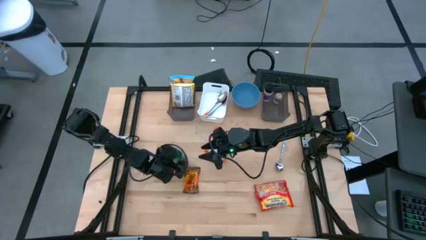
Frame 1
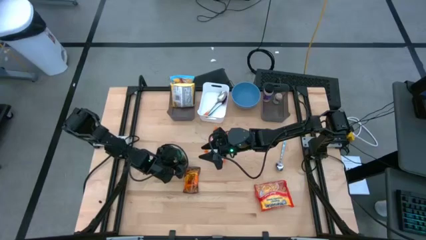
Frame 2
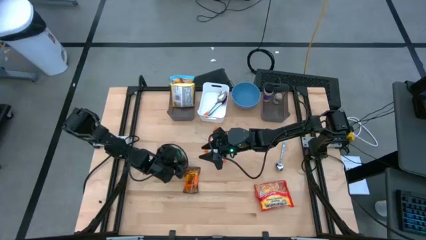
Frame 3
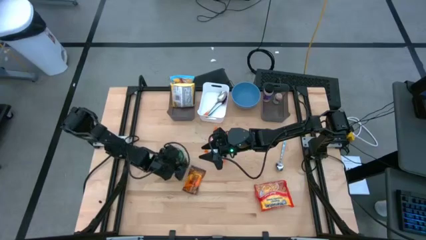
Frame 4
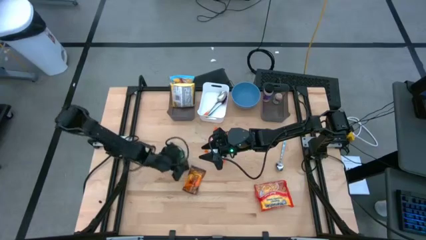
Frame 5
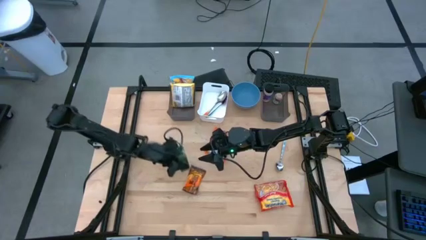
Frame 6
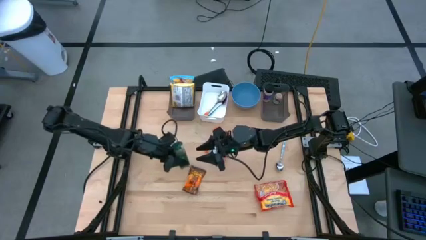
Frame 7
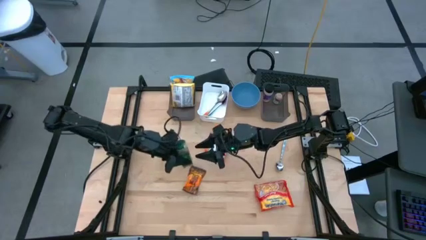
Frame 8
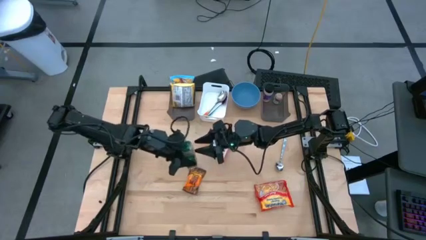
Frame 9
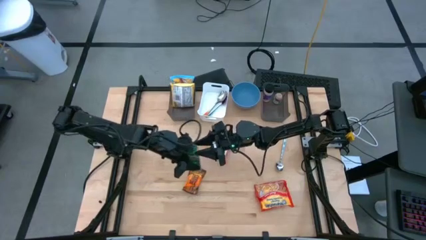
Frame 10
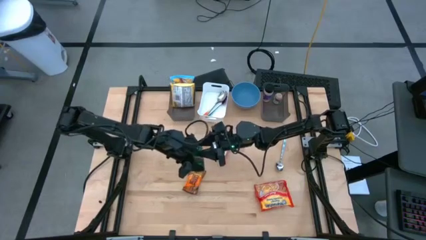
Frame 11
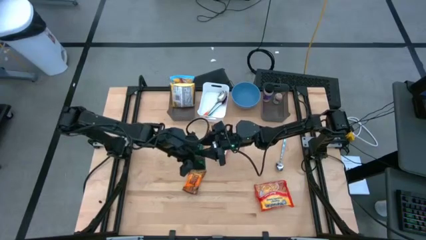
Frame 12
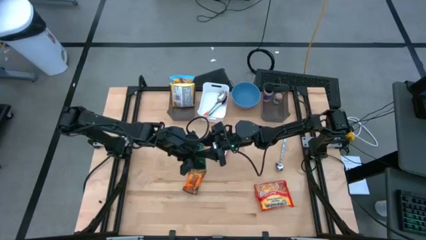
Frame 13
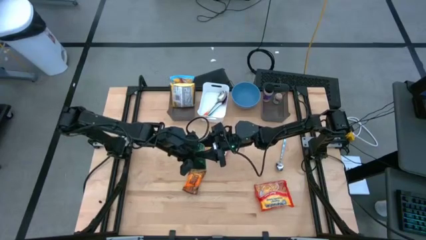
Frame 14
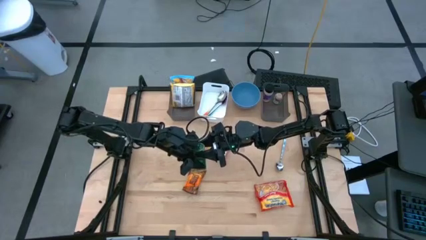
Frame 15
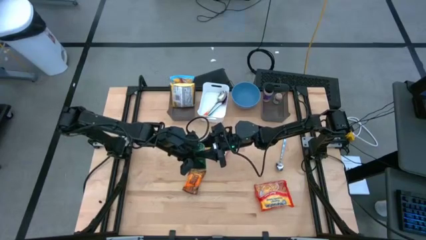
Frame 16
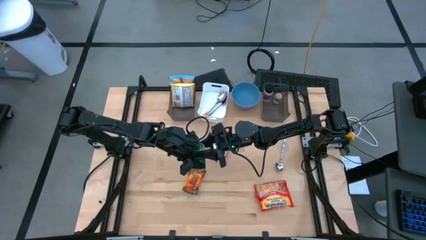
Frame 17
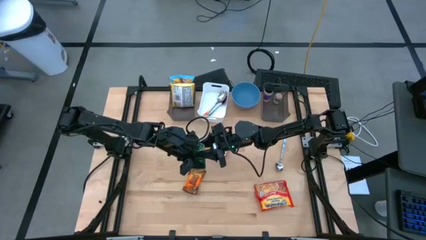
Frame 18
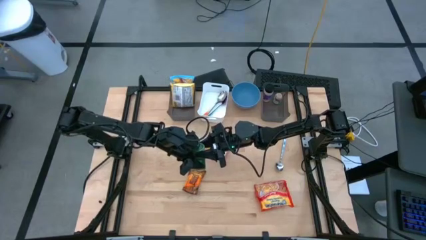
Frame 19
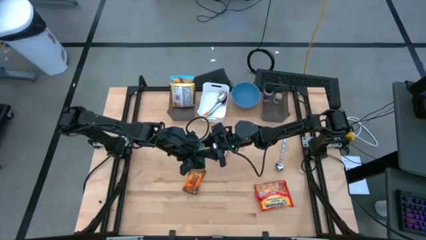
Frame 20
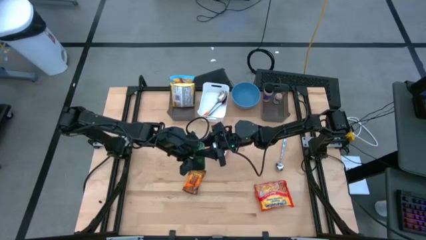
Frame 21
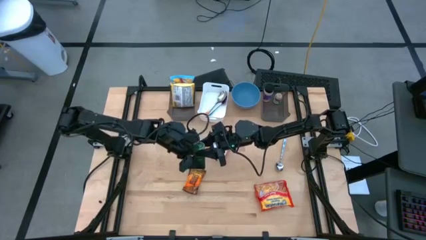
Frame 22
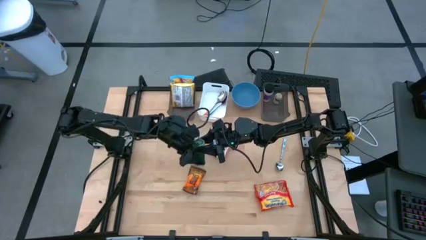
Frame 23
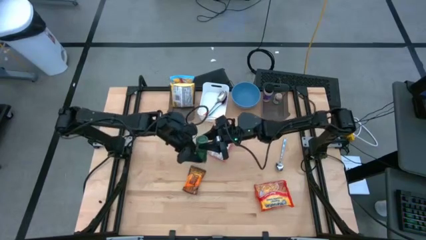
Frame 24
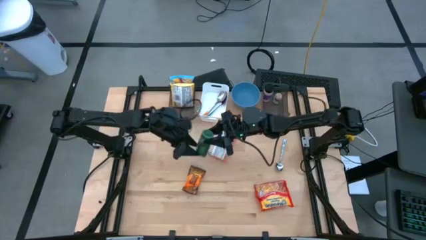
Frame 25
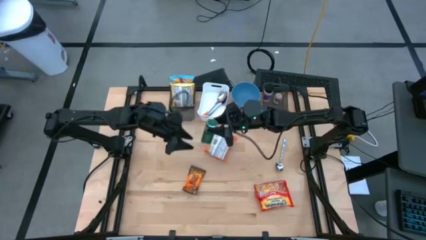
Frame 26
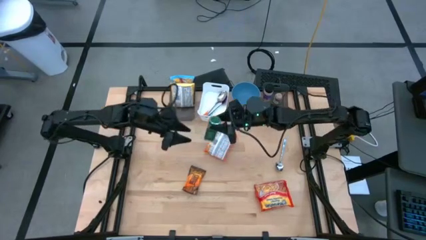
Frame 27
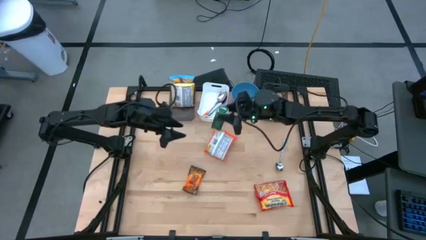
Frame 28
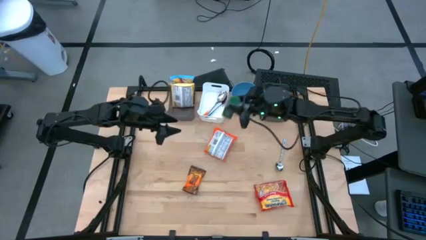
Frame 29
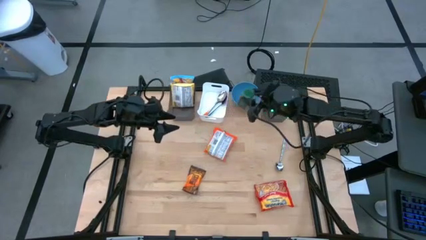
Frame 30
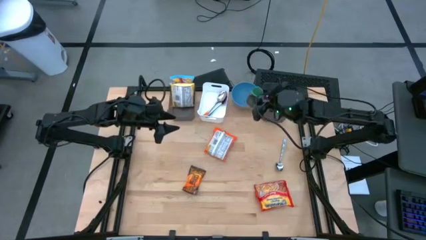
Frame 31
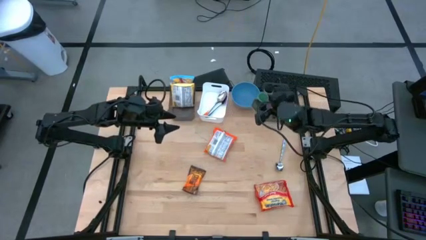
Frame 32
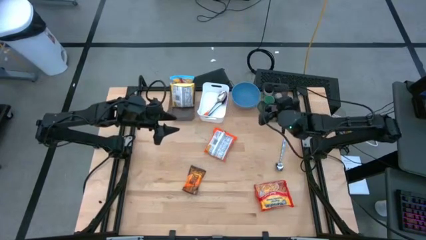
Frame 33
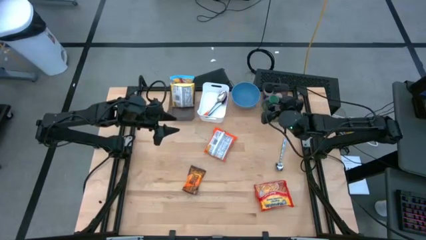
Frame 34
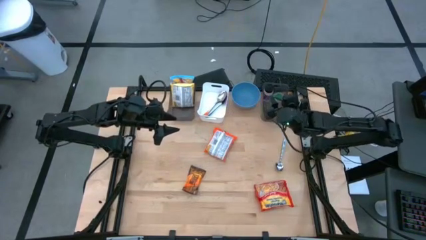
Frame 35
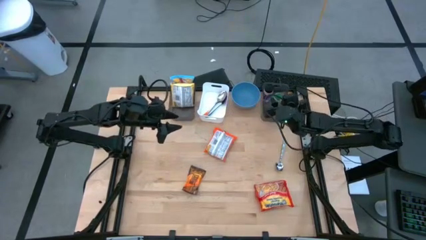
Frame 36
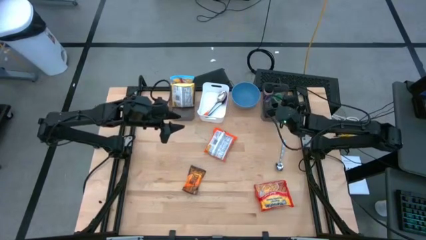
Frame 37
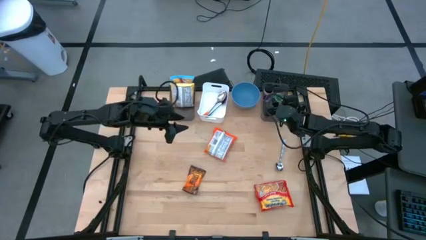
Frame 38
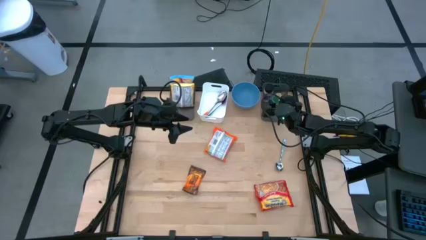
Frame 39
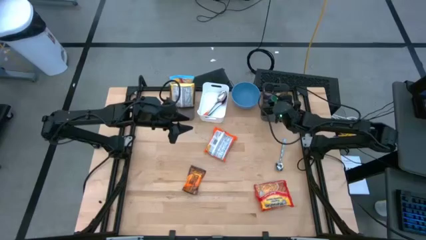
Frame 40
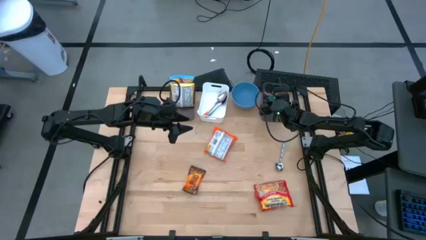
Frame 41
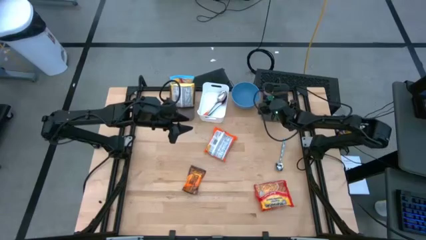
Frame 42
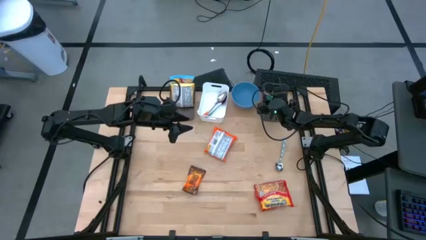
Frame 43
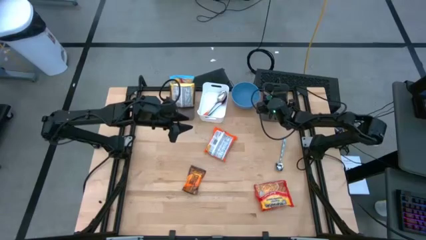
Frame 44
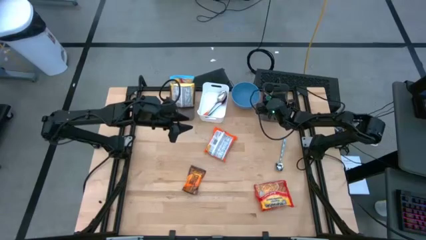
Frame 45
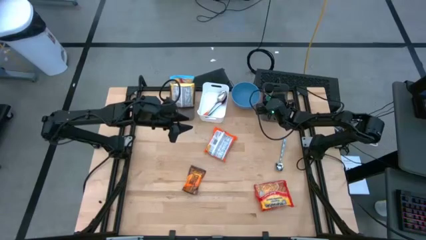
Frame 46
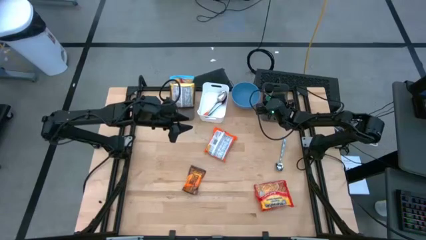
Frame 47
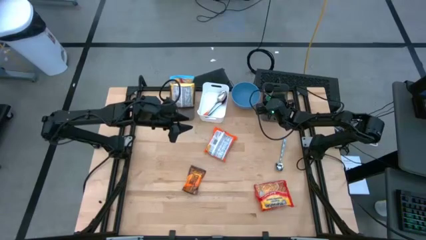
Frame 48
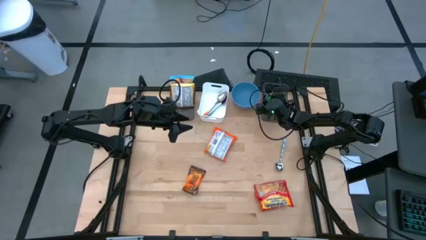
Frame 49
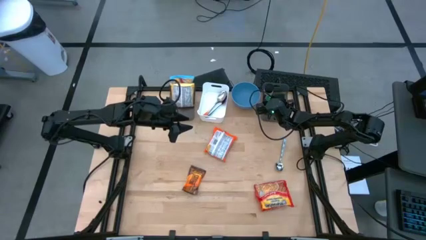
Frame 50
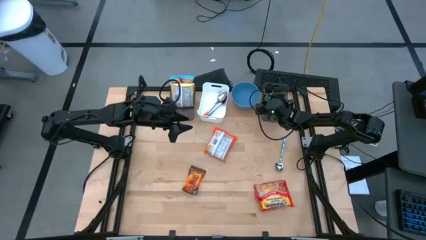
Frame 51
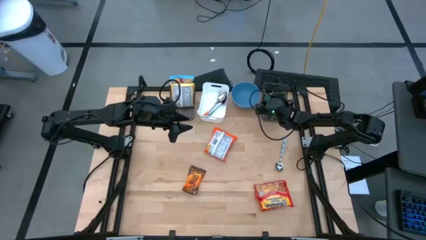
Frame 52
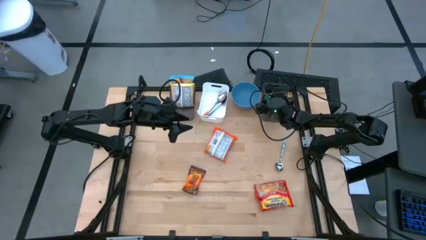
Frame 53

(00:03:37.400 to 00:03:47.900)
Task: Pick & Place Food Item
Put the green spice bottle into the right black bin

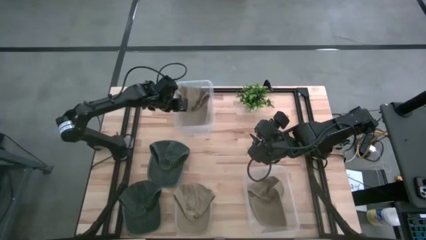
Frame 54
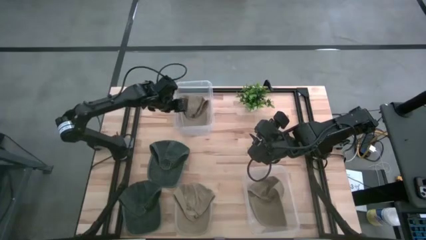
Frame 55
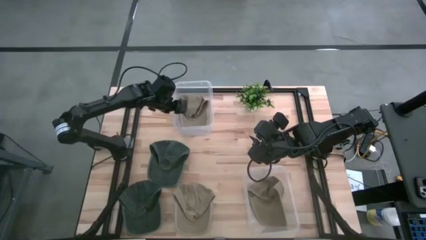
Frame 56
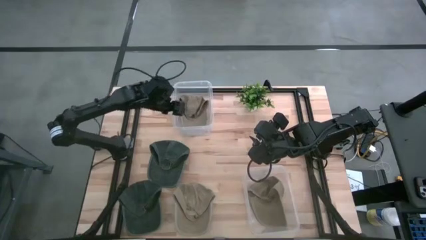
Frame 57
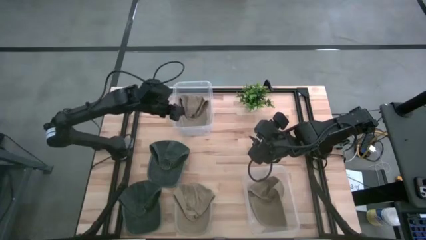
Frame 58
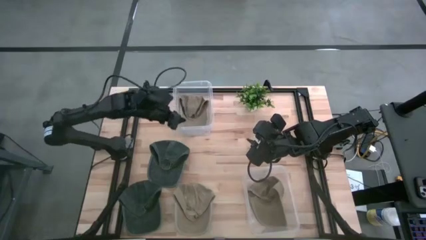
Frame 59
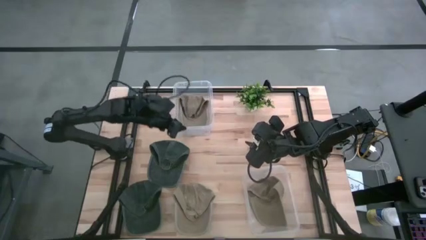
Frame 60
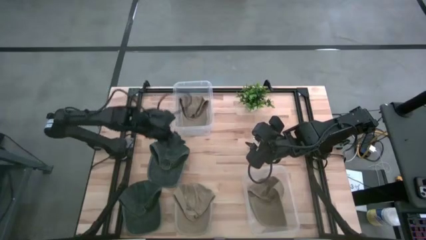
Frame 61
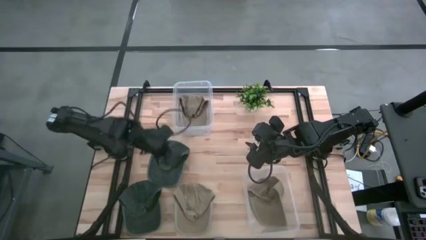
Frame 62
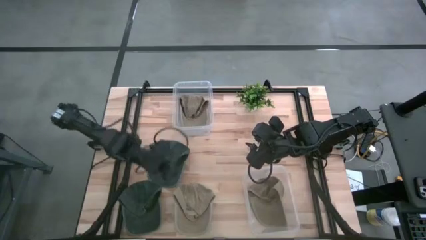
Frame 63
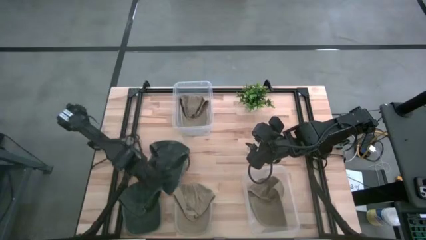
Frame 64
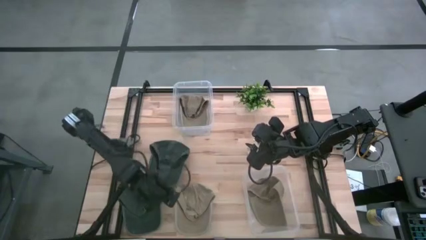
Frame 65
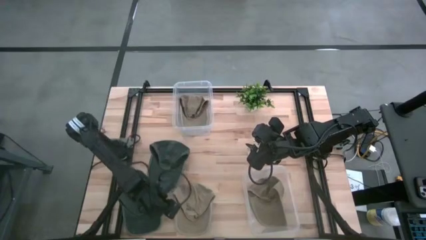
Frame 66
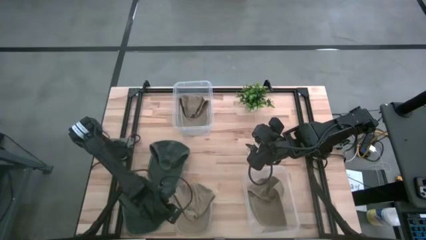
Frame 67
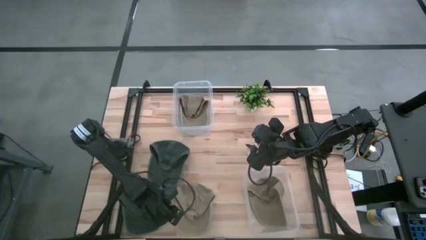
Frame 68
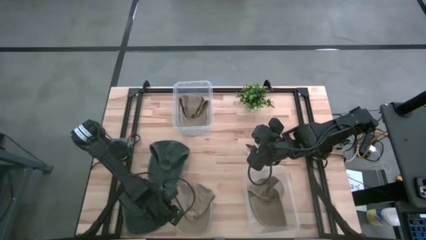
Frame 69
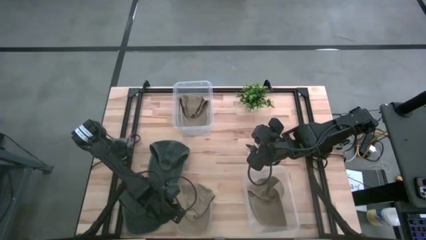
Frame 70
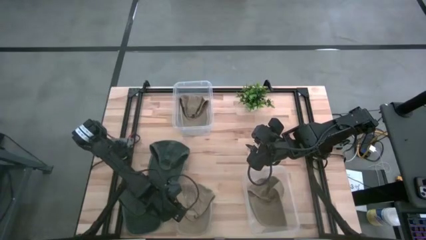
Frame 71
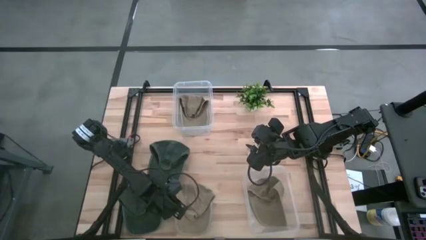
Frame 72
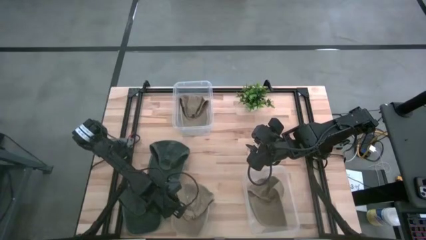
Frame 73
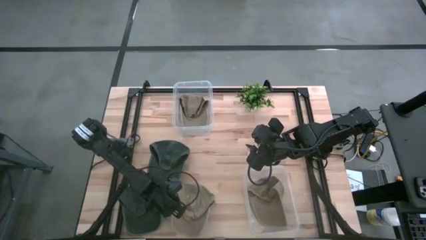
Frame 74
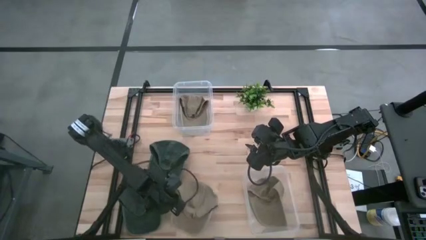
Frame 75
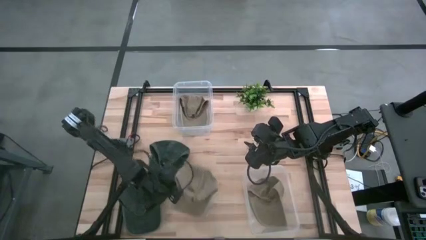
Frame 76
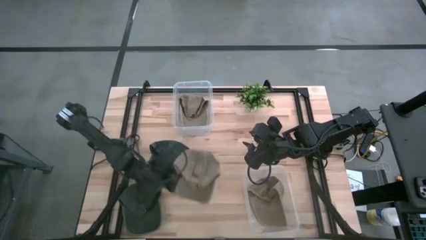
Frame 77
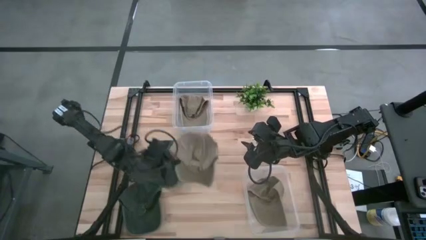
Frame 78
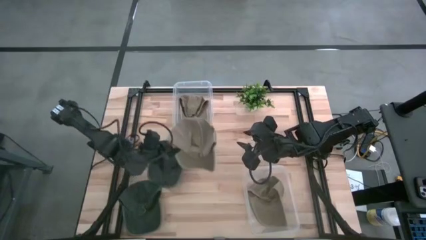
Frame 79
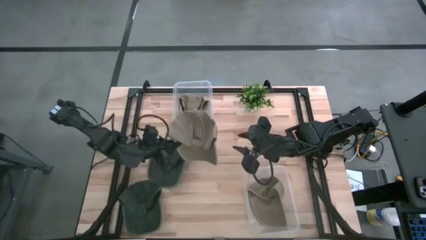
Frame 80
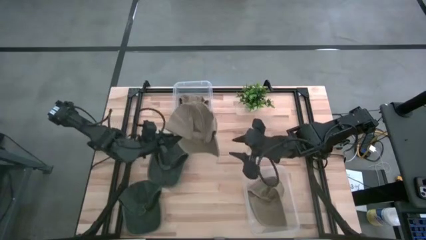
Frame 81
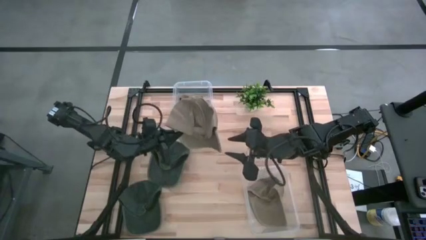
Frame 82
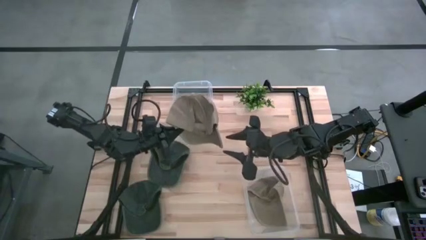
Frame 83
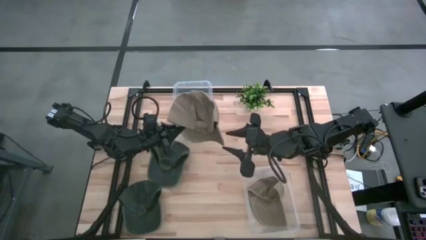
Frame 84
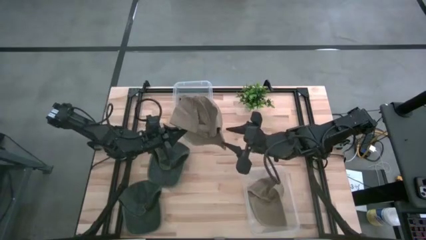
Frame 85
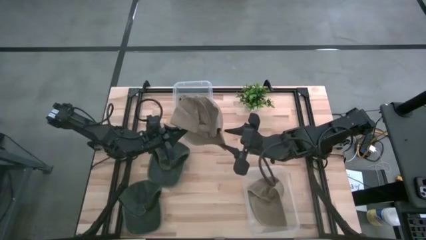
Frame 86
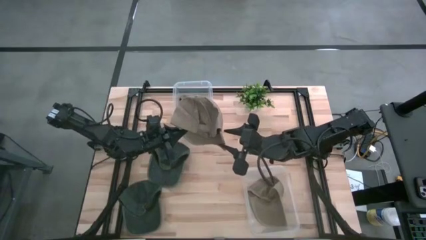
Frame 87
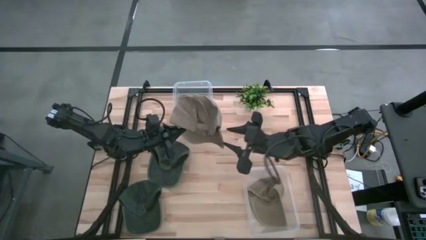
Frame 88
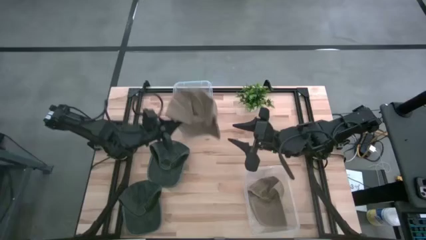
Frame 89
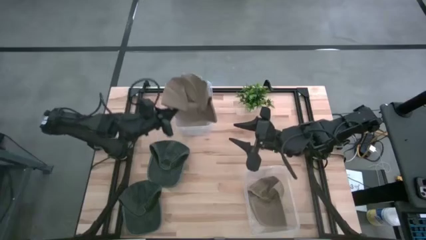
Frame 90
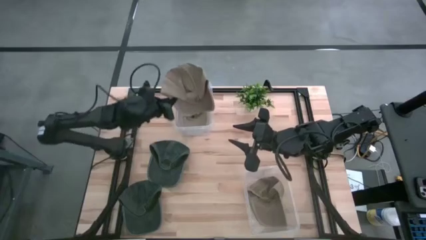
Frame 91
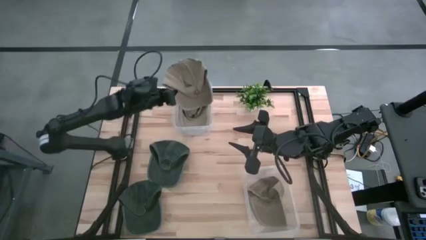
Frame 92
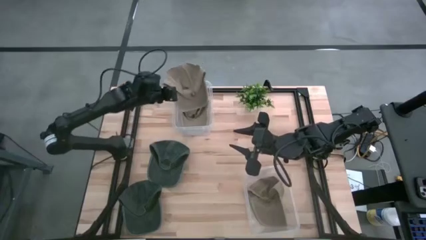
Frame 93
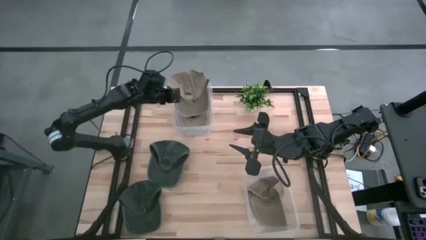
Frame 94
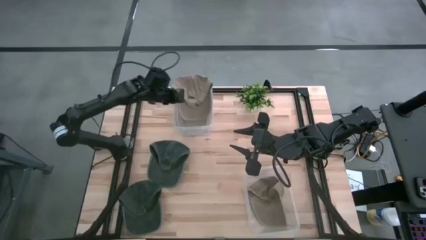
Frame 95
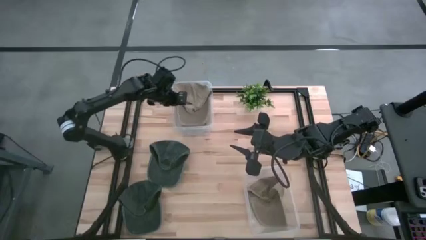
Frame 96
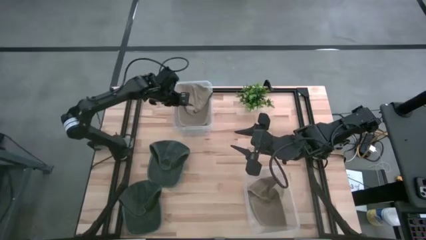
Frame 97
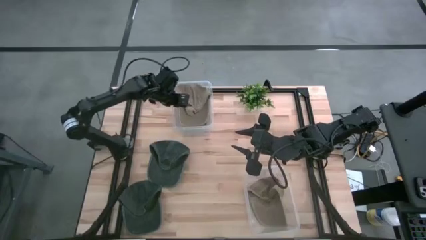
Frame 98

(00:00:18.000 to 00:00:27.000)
Task: Pick & Place hat
Put the brown cap into the top transparent bin
